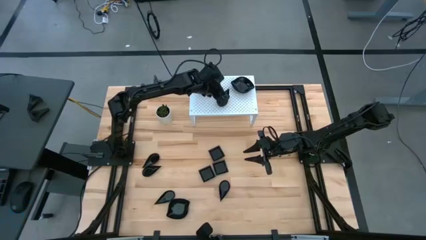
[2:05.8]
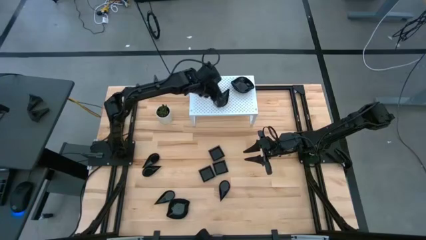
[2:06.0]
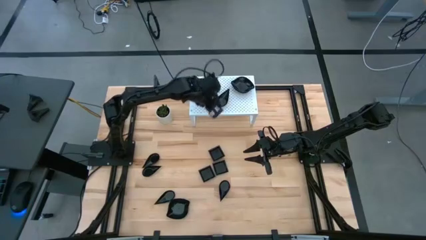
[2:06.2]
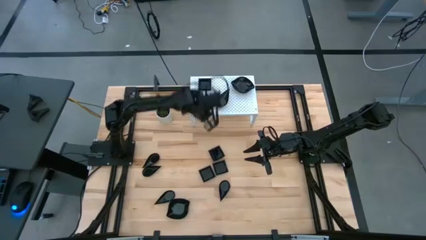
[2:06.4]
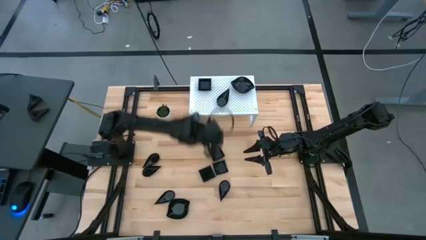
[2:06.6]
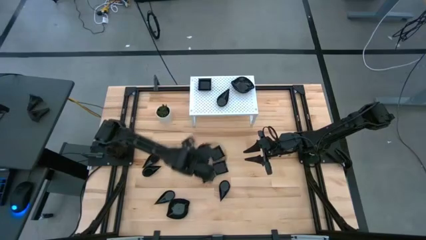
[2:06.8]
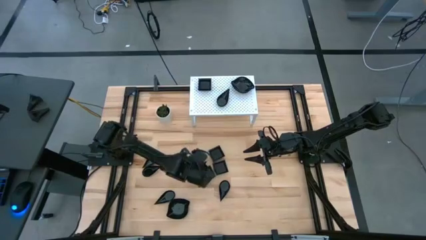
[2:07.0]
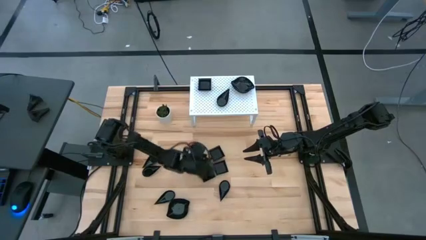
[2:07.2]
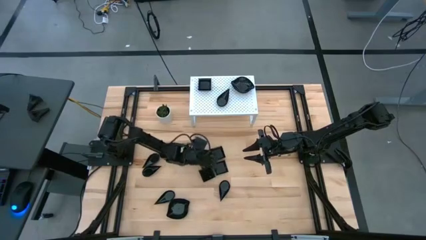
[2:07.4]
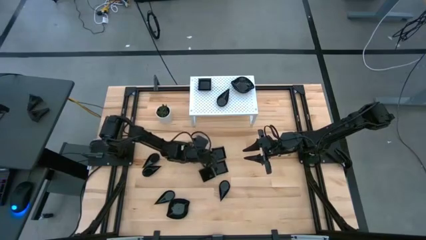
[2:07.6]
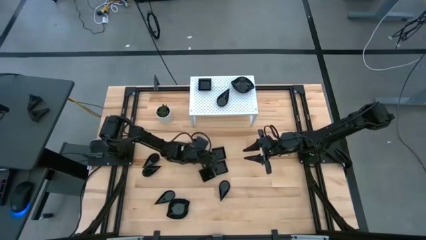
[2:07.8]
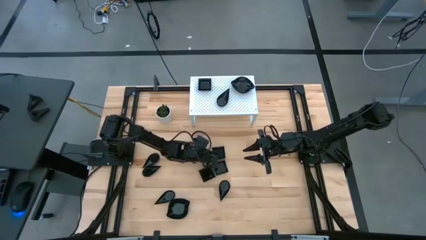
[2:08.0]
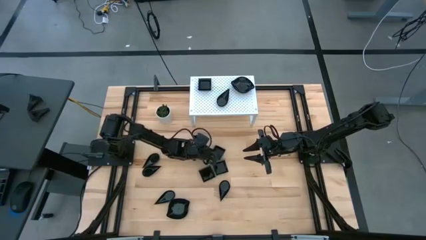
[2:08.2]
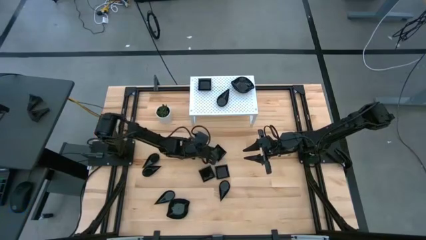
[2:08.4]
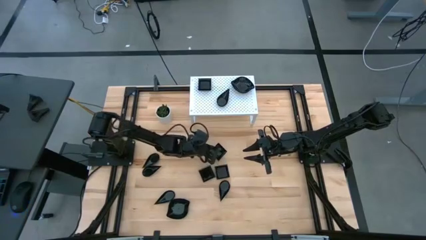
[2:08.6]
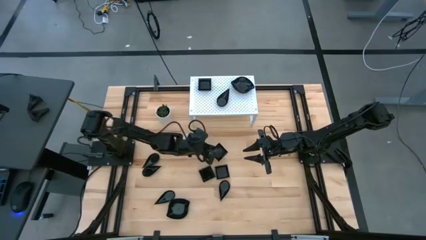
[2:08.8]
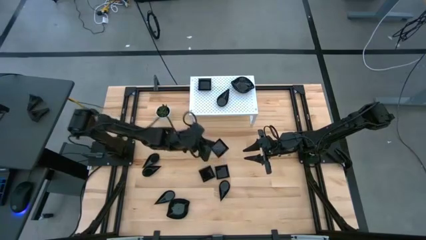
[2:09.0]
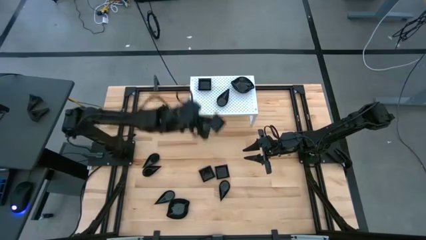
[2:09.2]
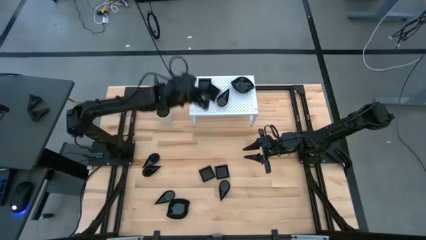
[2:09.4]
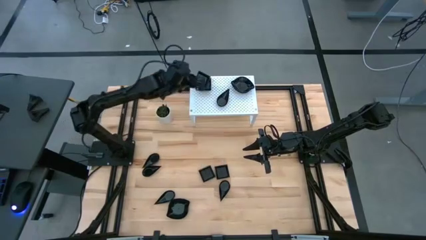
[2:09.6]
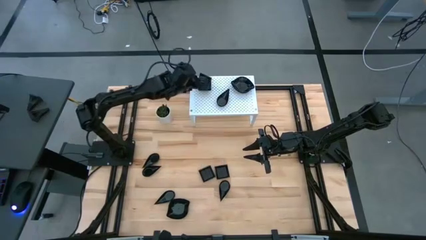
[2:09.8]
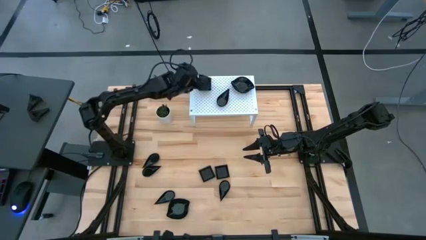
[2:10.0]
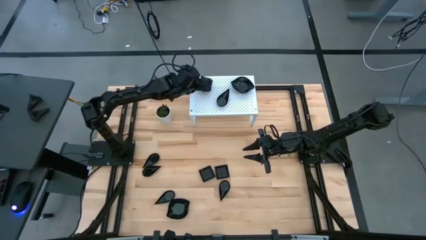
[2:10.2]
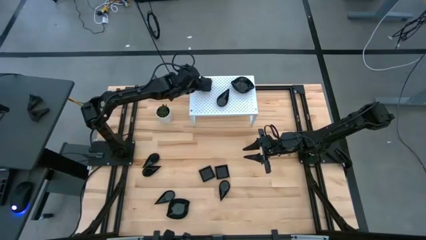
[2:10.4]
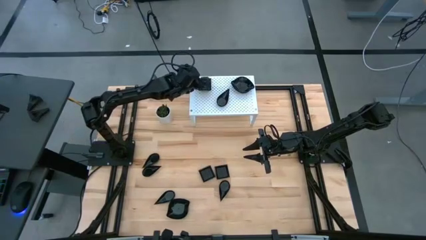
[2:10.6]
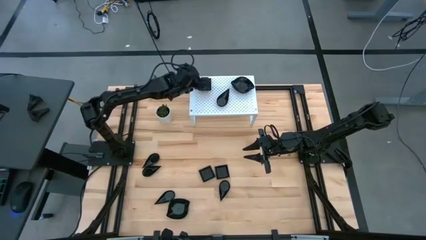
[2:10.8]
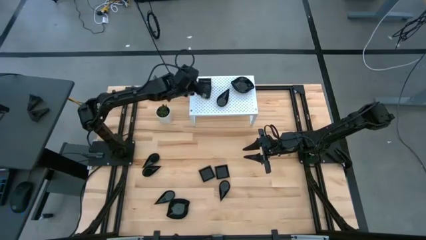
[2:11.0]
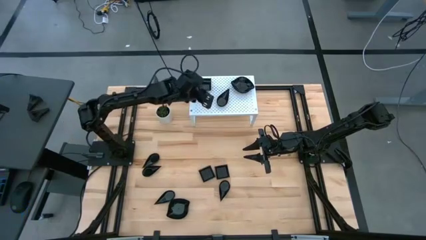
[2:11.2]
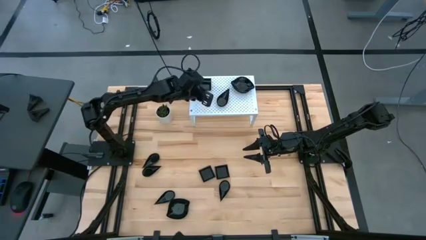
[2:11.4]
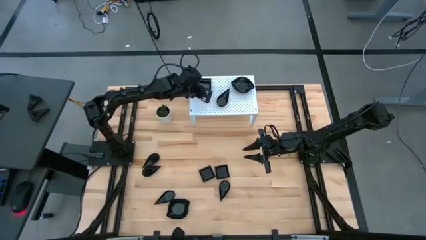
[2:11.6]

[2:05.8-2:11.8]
Task: Pick & Place Mini shaped plates
Stack the black plate on top of the black plate on the shelf

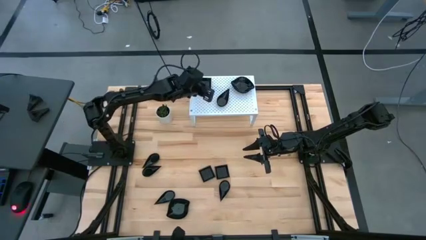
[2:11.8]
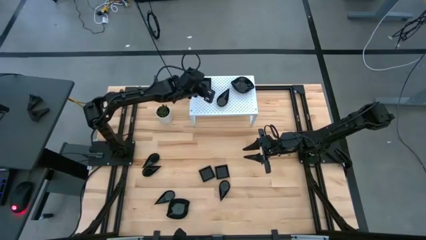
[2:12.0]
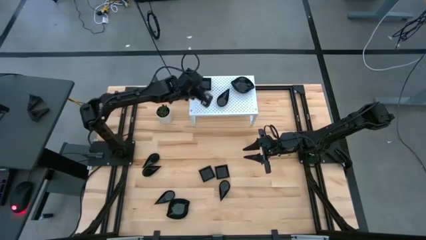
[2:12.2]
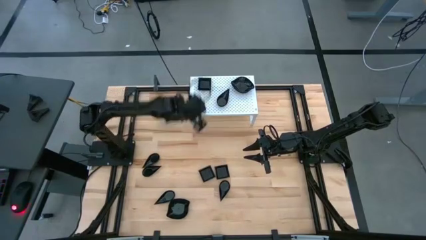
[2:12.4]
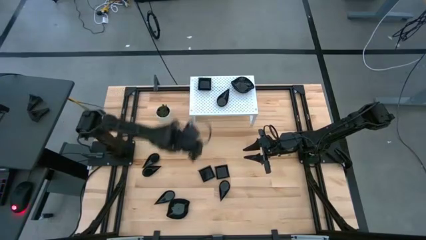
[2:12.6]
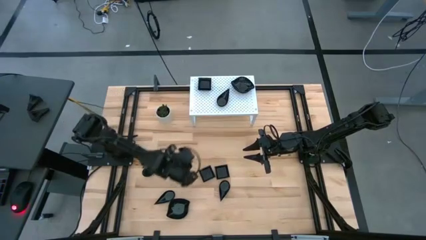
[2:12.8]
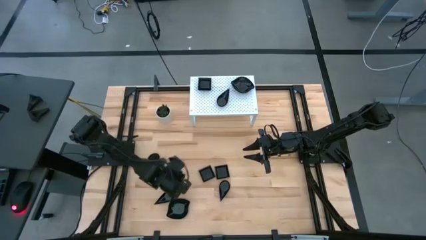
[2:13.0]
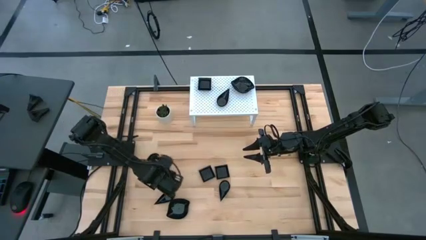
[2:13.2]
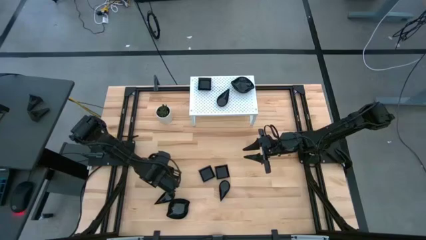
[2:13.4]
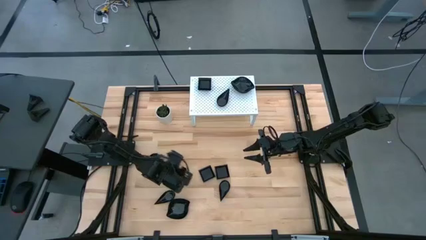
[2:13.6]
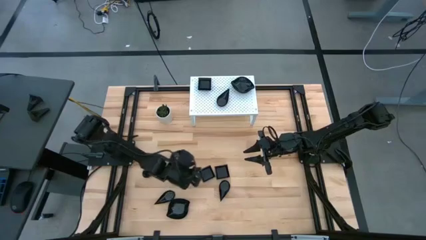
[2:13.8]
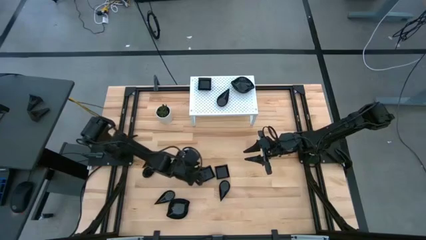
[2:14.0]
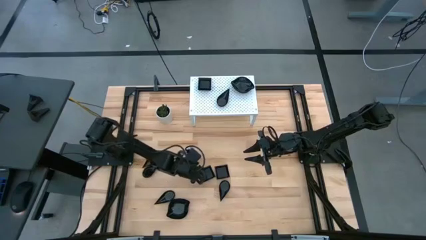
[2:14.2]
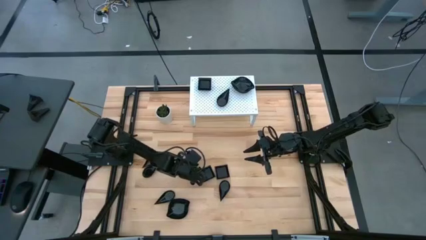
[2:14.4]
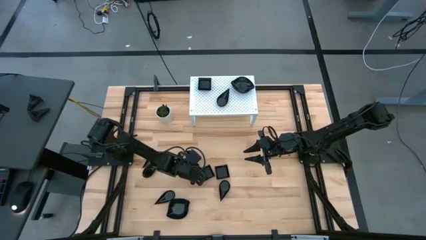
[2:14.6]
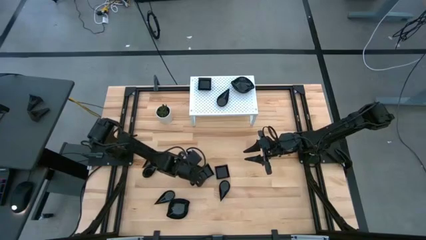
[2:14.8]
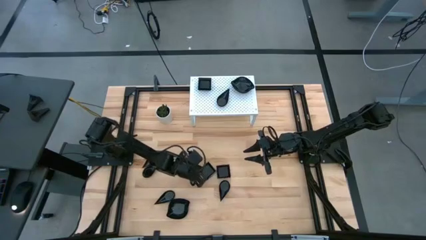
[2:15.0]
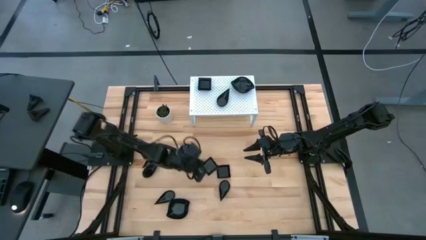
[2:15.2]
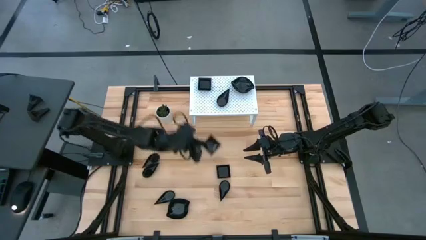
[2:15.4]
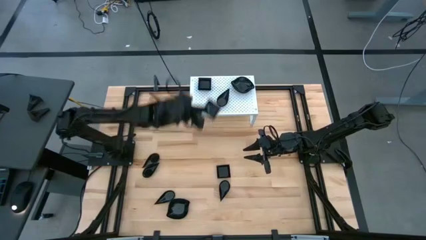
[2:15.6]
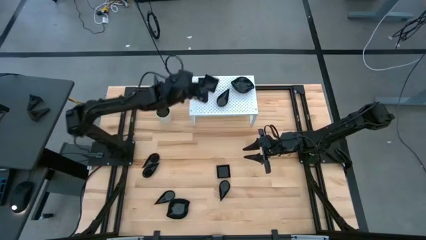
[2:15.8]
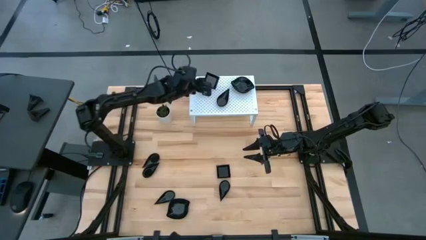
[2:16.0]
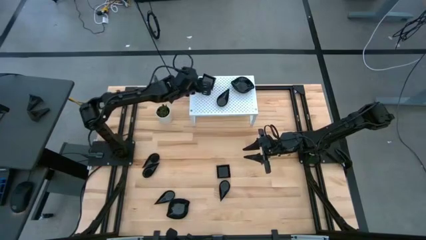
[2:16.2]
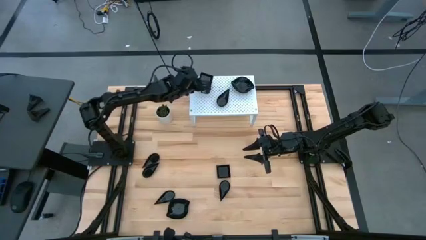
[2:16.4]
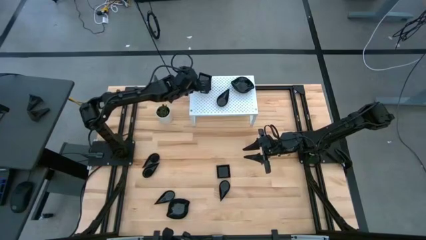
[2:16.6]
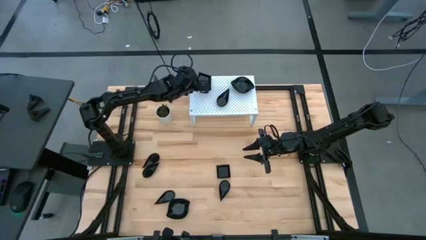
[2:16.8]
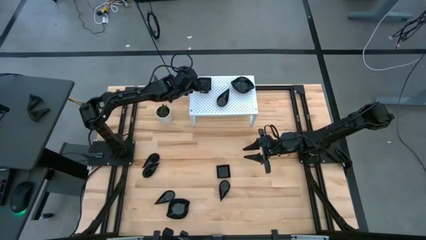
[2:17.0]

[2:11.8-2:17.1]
Stack the black plate on top of the black plate on the shelf

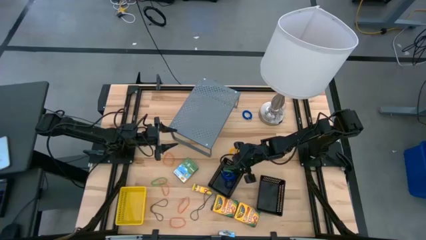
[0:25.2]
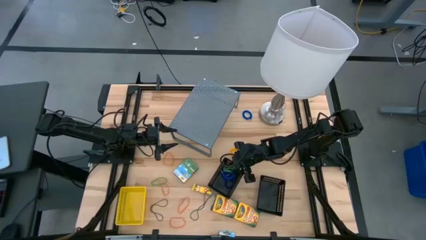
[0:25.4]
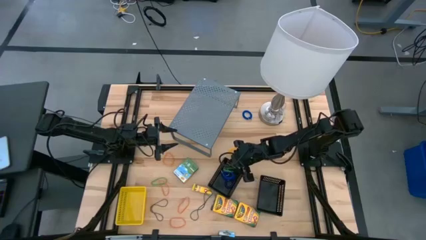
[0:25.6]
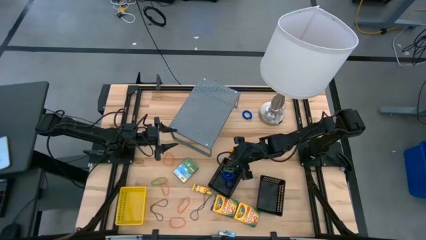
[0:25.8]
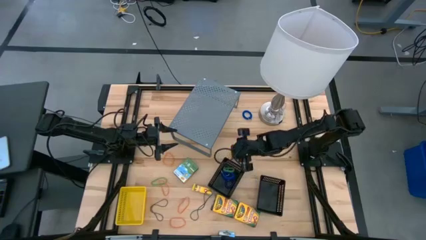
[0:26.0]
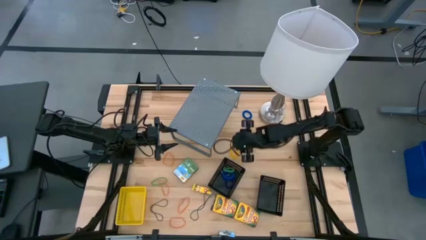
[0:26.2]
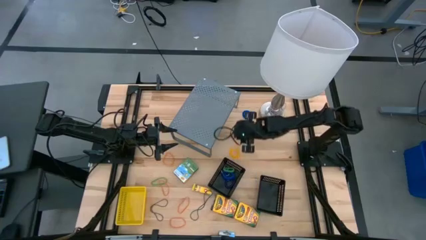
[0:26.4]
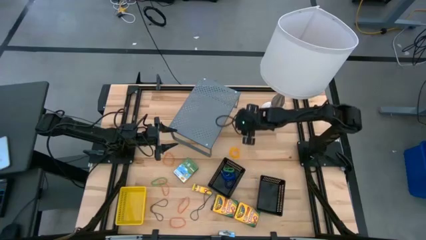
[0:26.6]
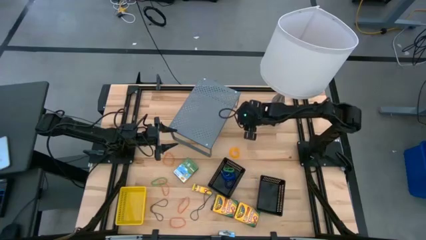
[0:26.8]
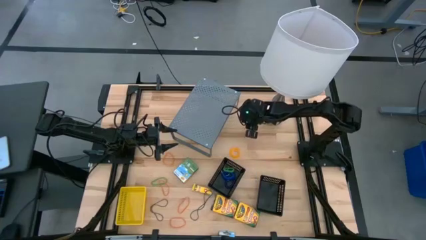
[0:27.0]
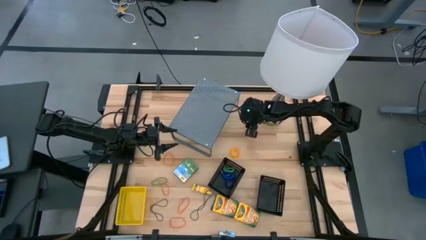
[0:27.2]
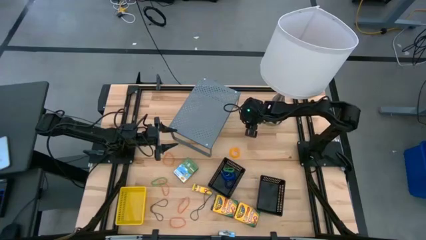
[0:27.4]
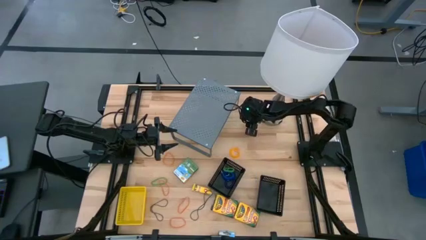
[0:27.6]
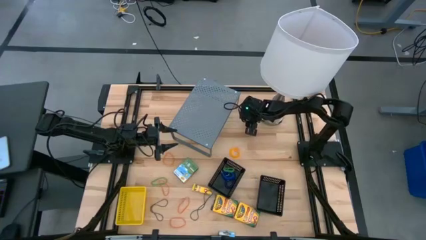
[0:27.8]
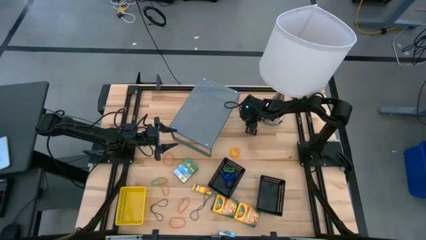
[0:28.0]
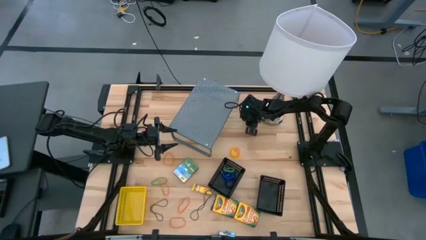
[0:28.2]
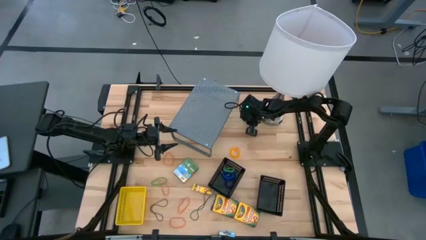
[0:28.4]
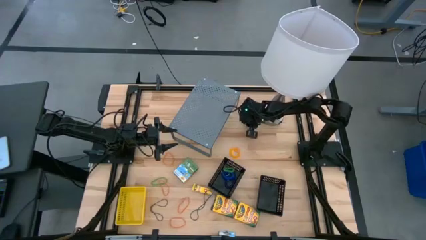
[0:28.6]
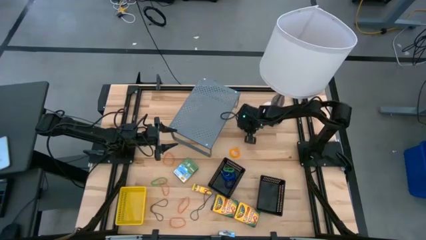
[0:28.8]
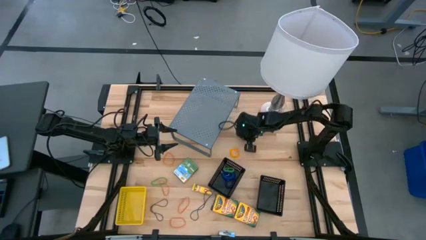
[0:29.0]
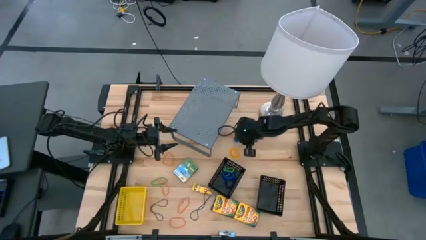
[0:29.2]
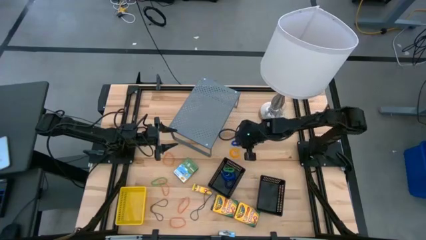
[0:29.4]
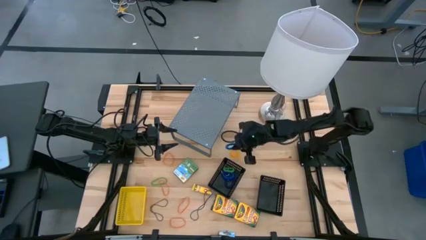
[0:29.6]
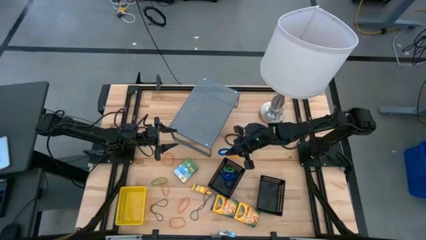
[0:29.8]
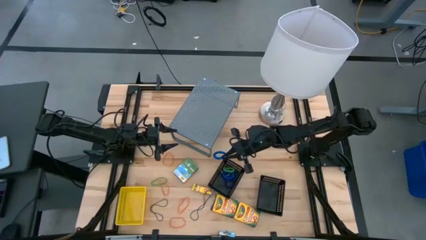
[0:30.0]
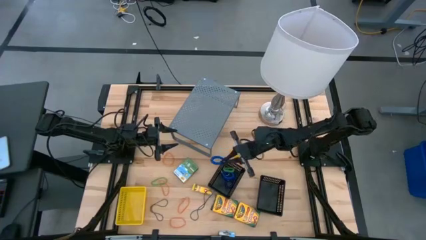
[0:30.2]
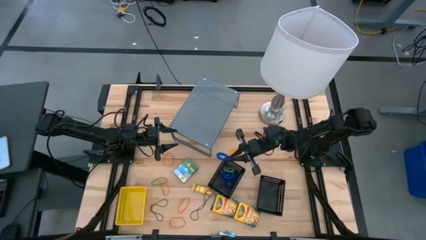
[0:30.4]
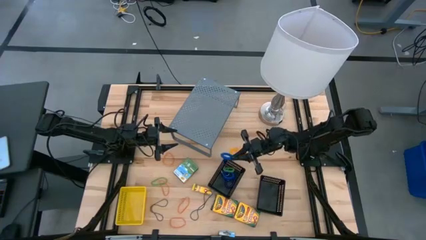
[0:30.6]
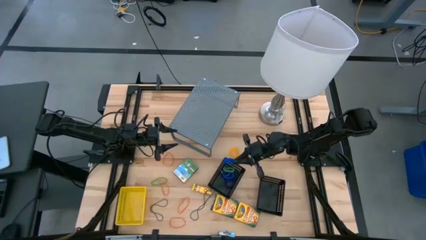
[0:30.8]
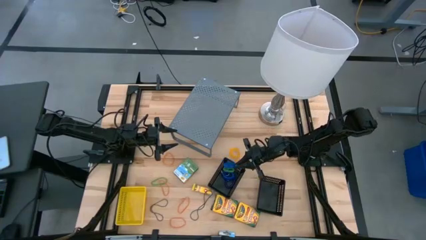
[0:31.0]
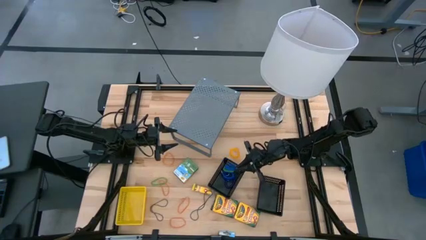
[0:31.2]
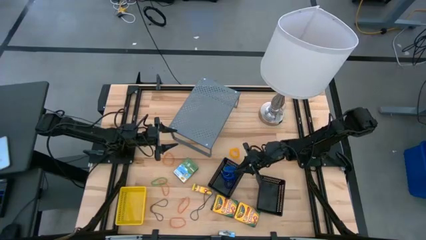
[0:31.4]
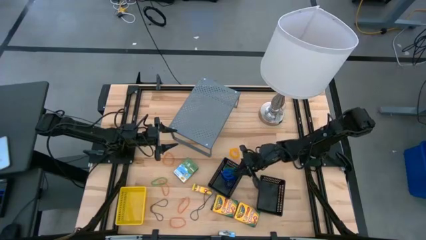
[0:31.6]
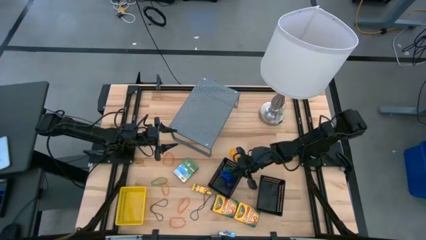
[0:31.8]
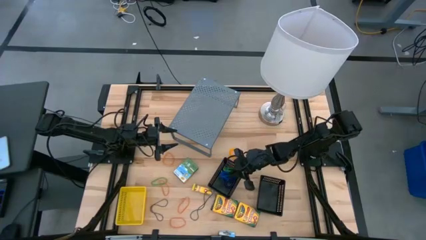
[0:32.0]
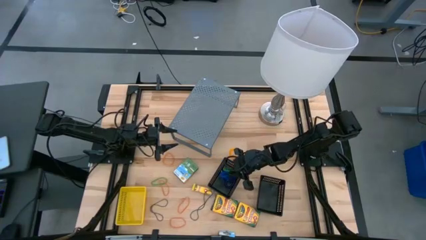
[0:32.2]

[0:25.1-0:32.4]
Task: Pick & Place Office Desk Supplies
Put the blue spring keychain into the left black bin
